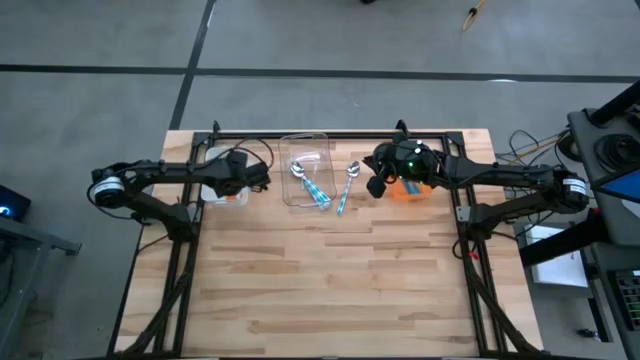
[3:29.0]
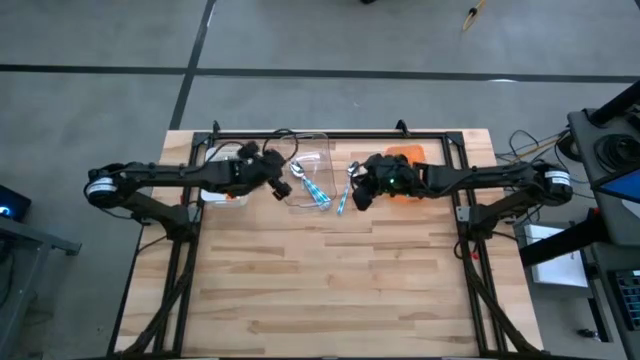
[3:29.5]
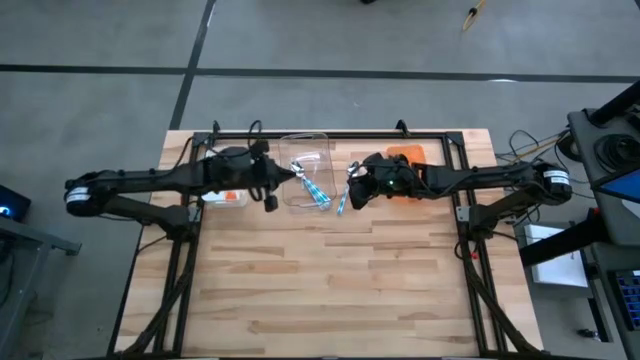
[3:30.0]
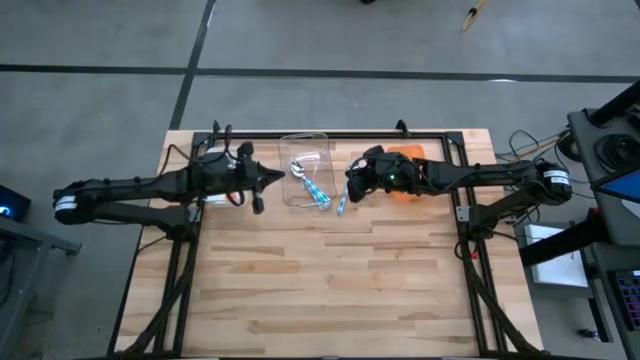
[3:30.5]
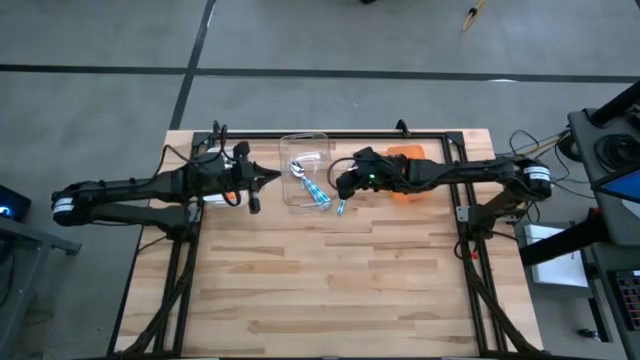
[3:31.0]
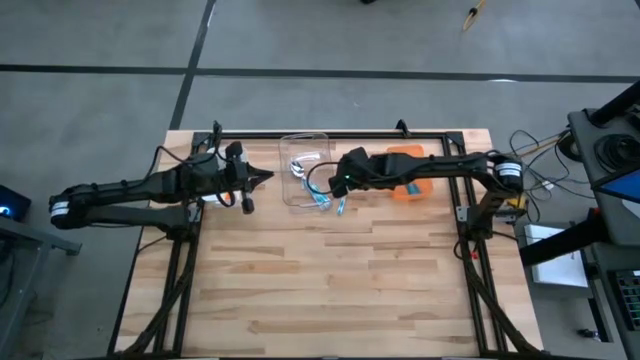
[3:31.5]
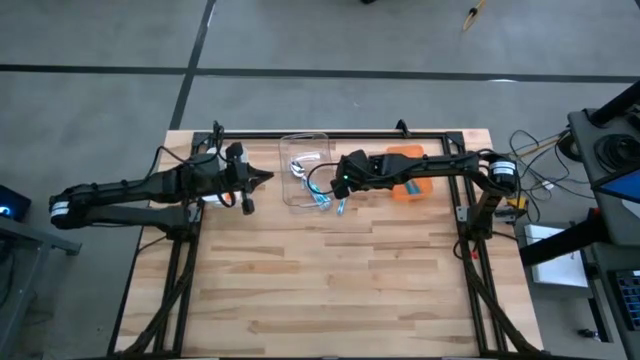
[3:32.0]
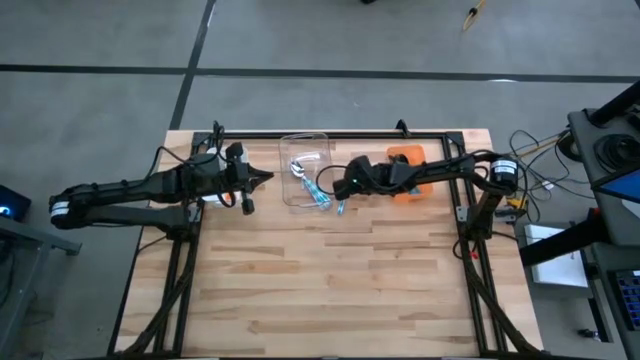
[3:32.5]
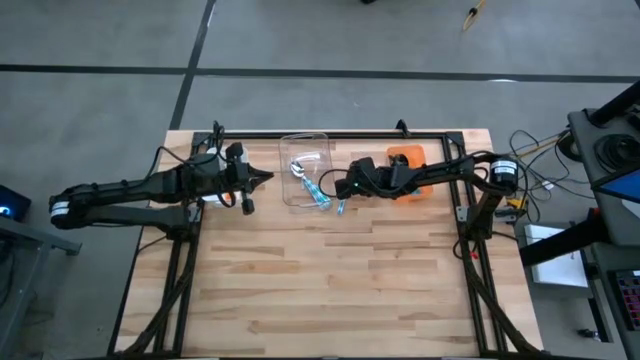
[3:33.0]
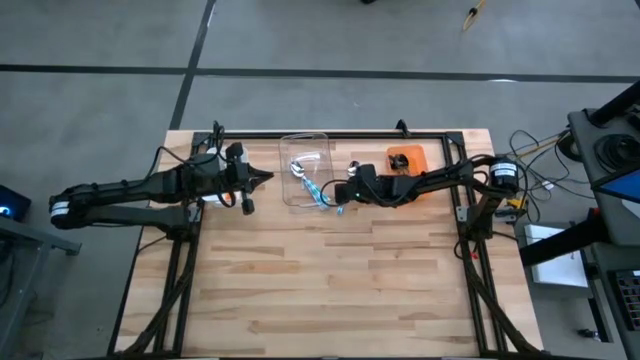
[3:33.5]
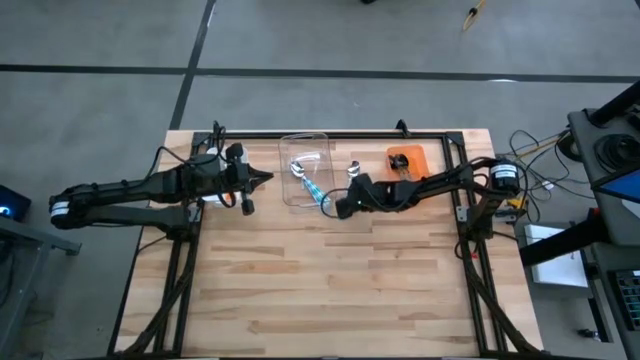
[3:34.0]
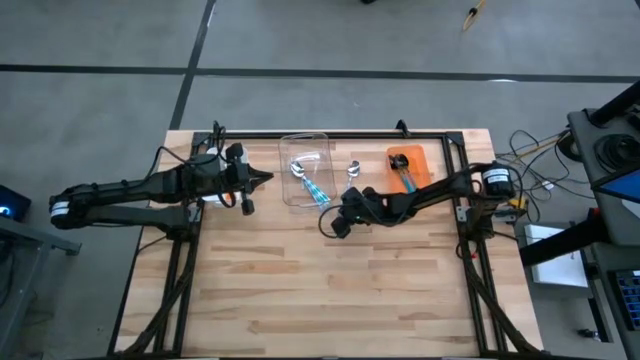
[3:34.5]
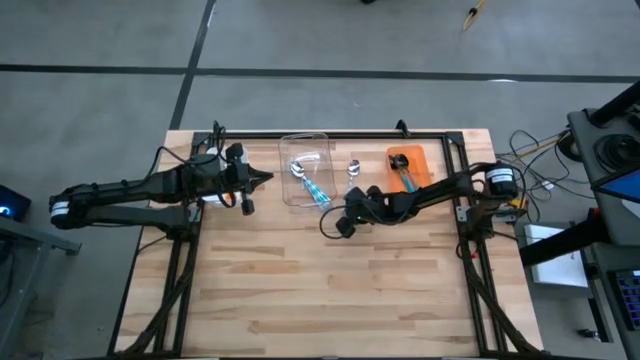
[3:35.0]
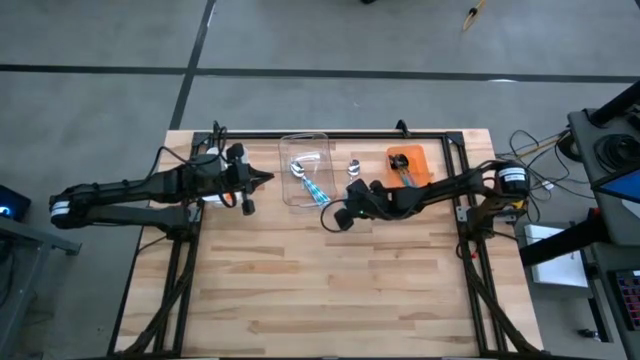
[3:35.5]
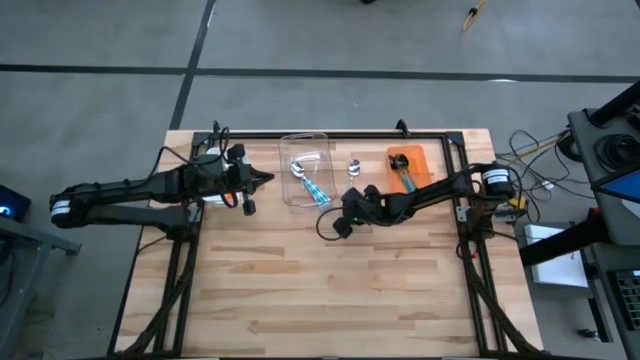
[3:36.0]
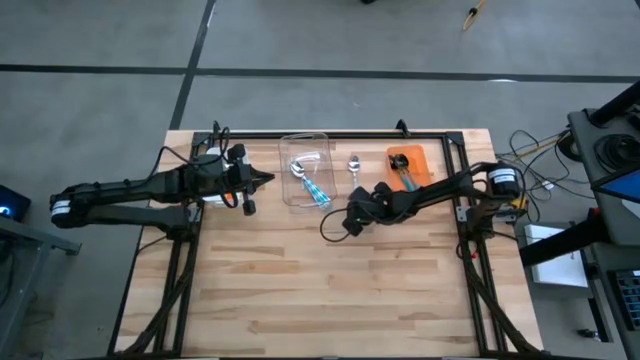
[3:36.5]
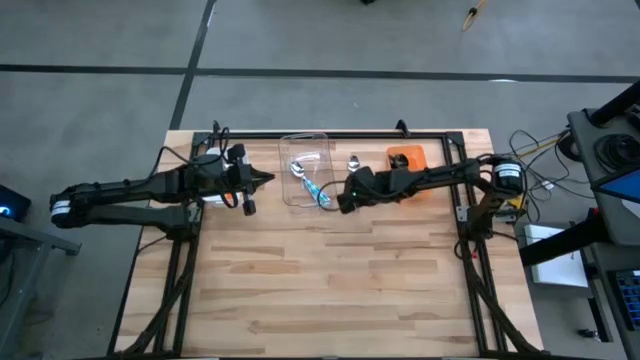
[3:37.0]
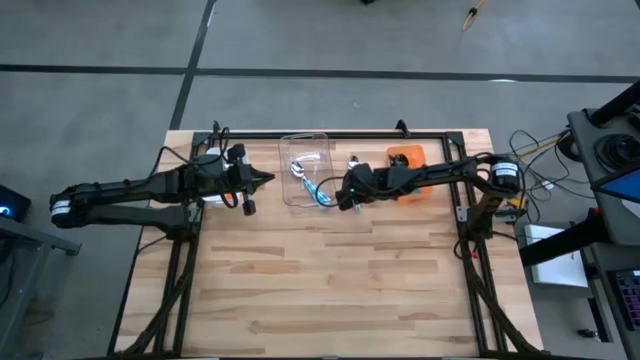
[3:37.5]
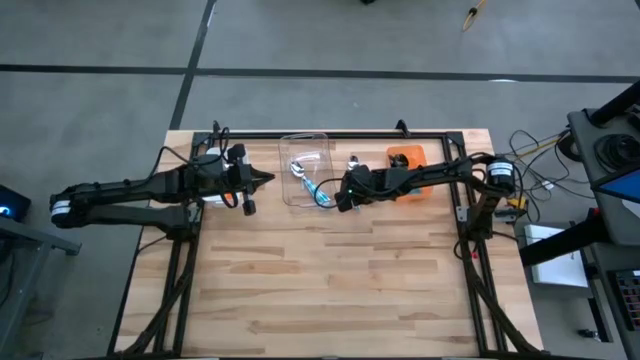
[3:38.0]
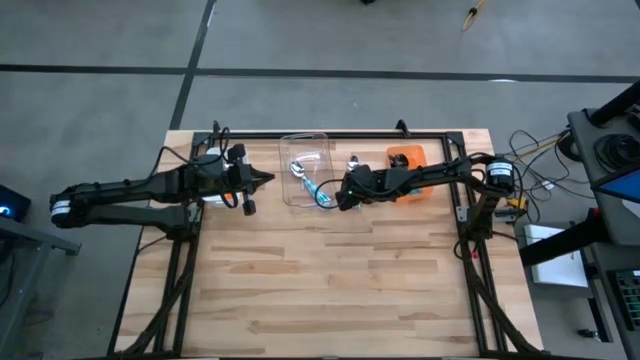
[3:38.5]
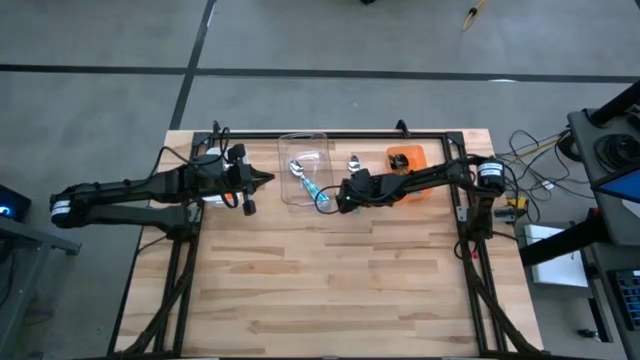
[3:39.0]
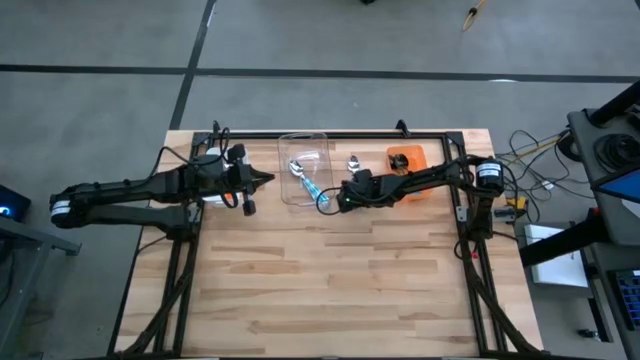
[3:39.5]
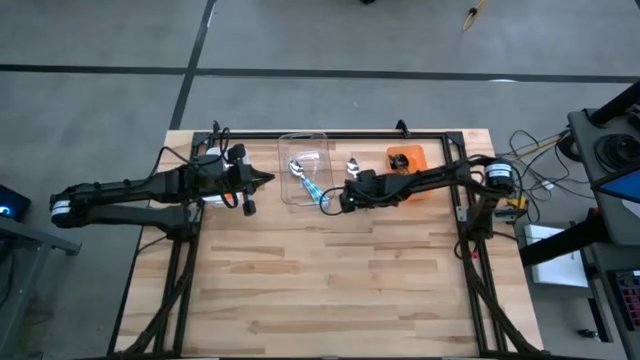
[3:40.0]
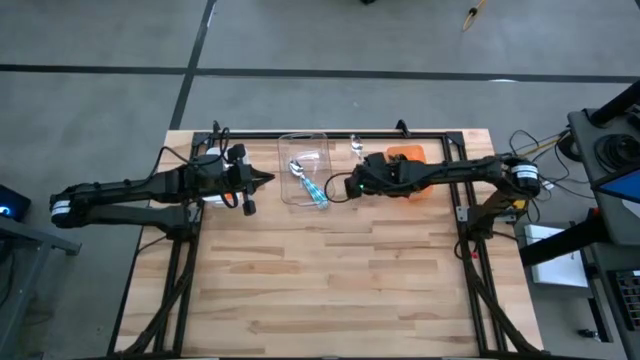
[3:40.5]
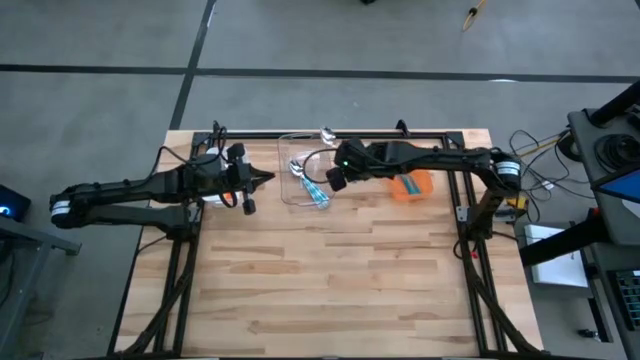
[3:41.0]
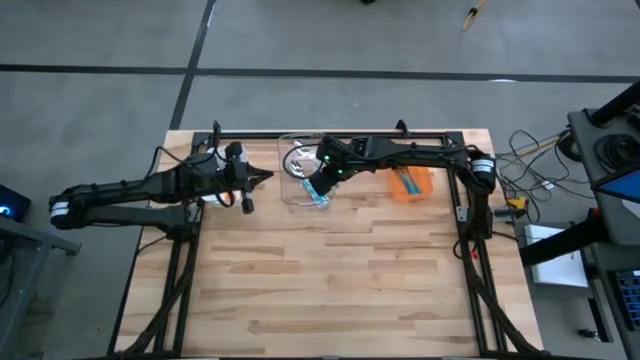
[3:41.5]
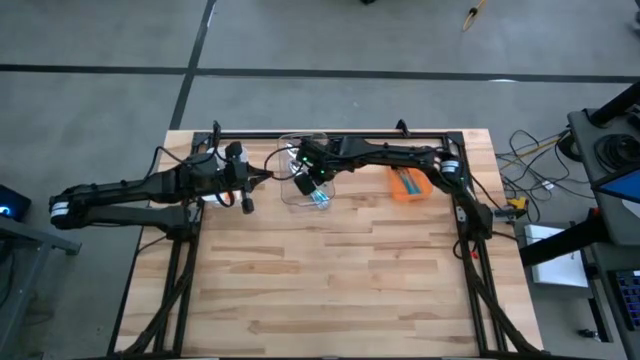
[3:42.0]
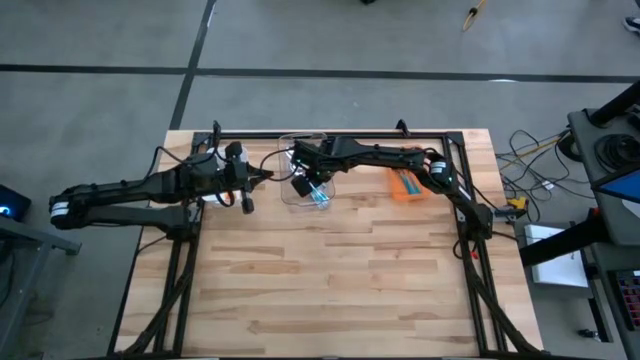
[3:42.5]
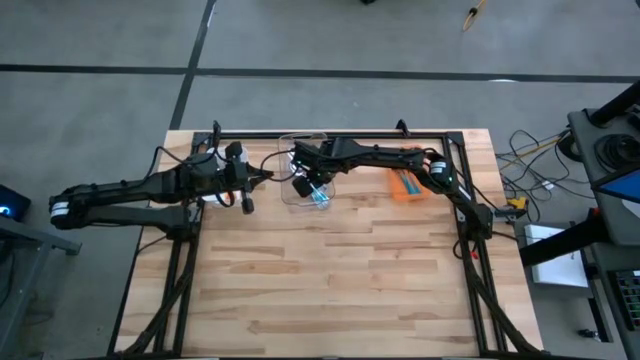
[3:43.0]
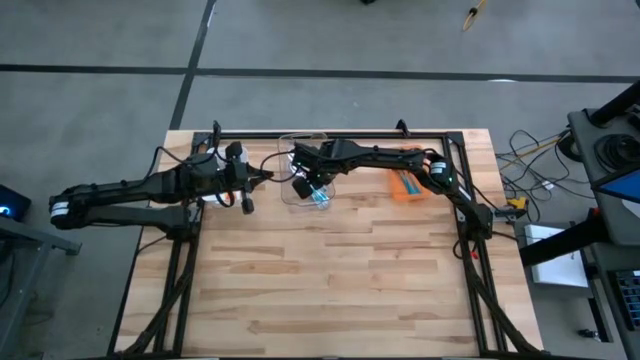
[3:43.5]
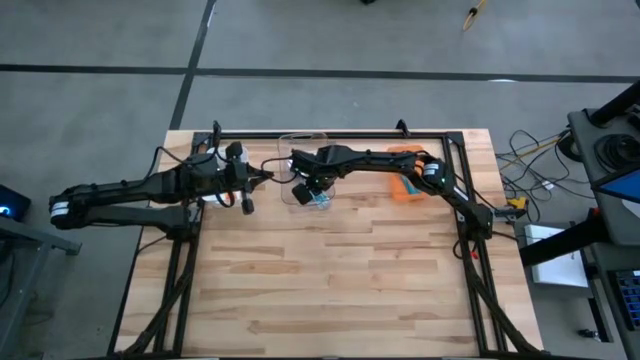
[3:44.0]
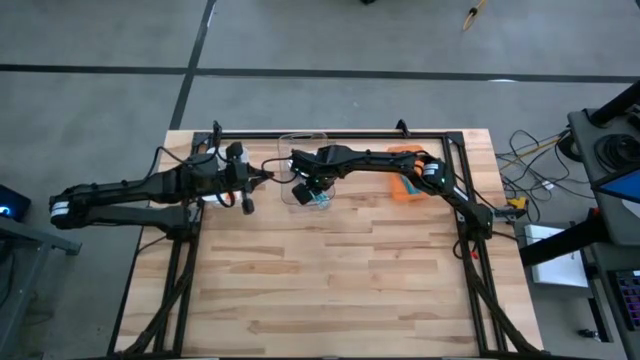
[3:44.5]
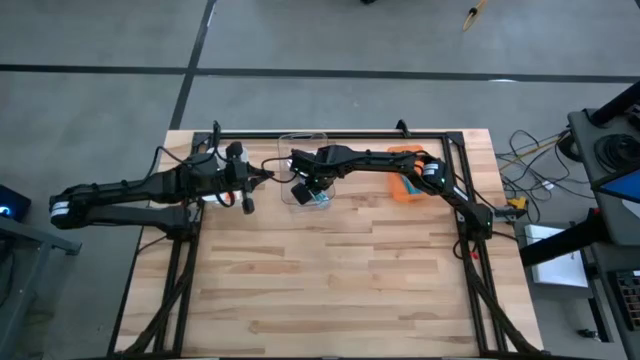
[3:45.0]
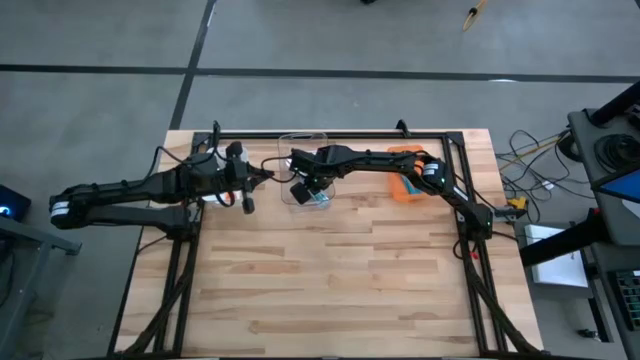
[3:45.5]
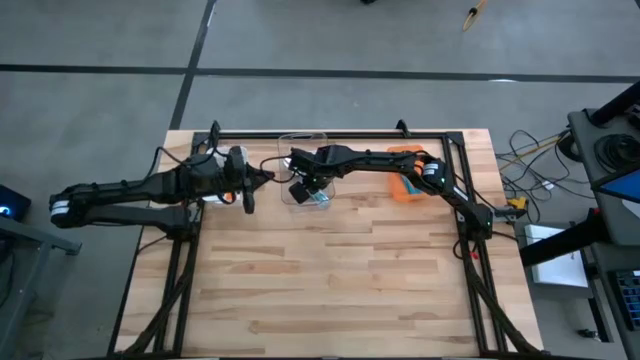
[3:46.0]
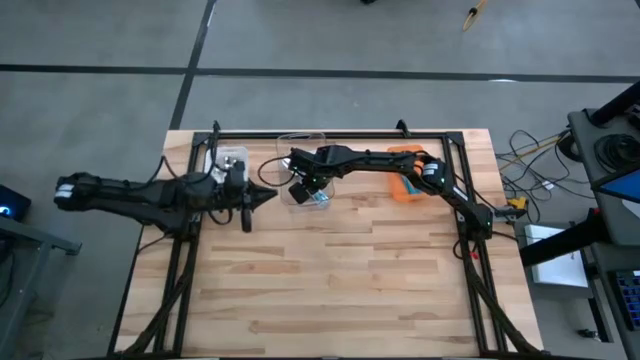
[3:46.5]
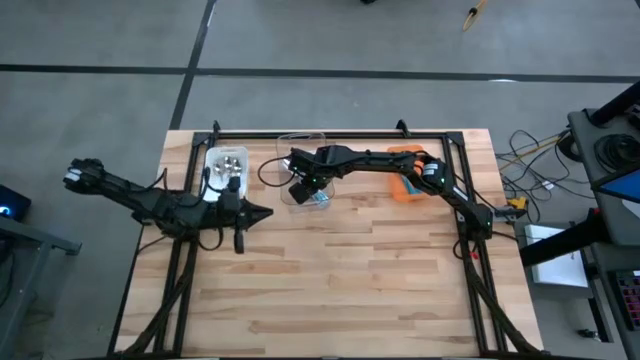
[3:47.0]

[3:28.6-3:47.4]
Task: Sort silverware by color (type)
Put the blue patterned spoon into the transparent bin

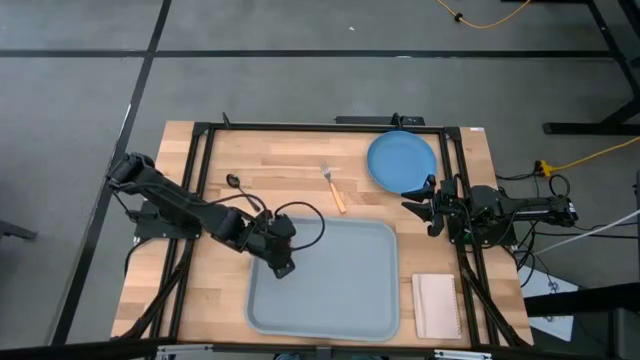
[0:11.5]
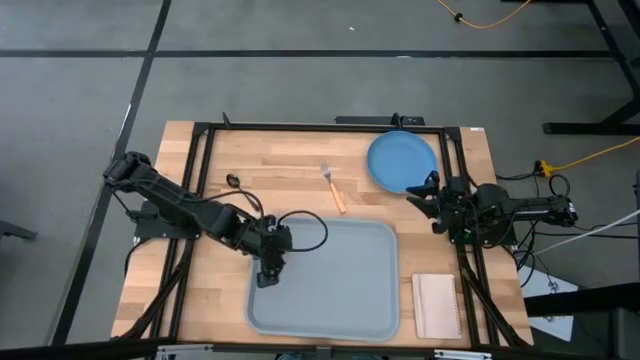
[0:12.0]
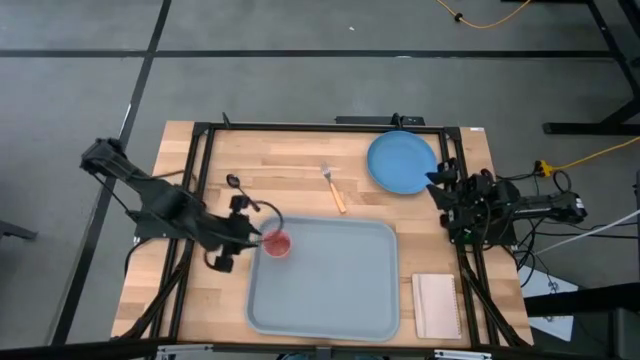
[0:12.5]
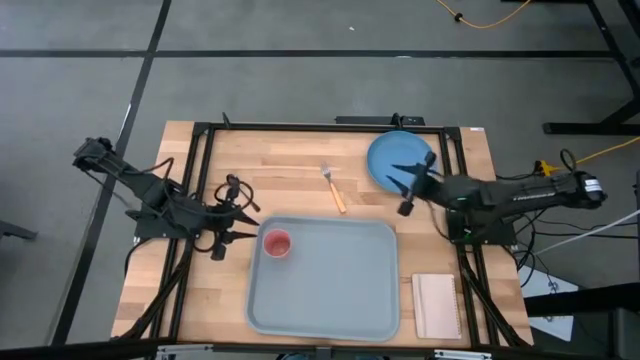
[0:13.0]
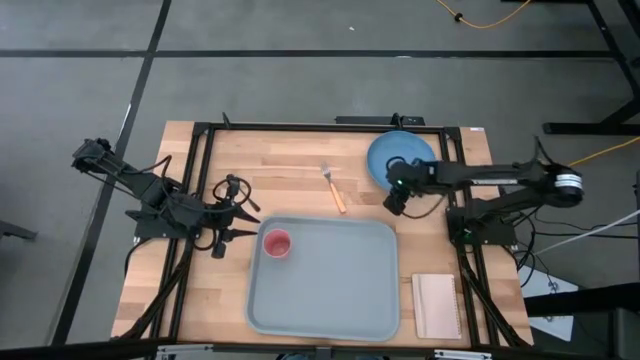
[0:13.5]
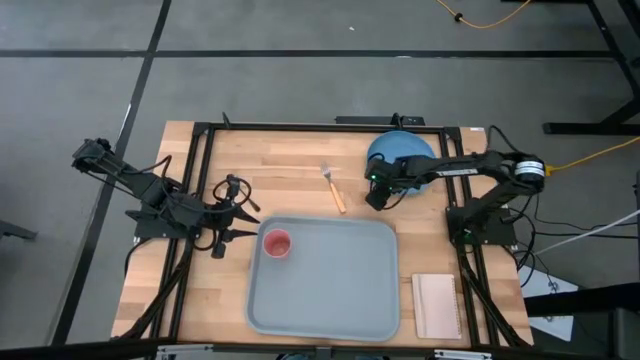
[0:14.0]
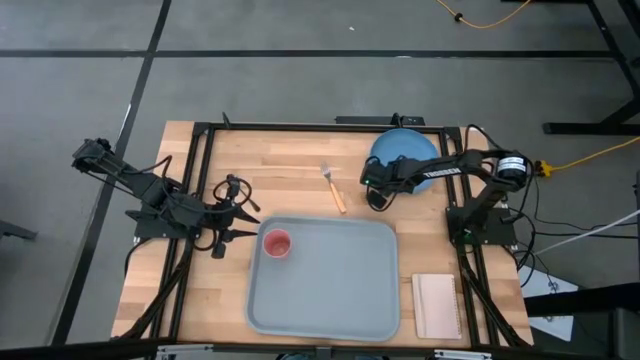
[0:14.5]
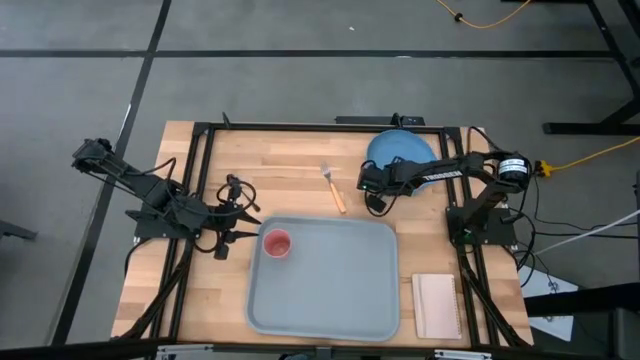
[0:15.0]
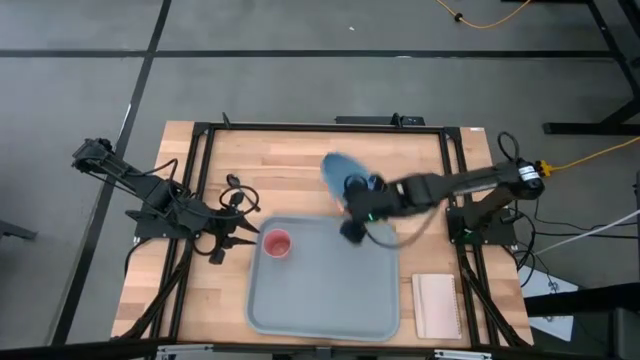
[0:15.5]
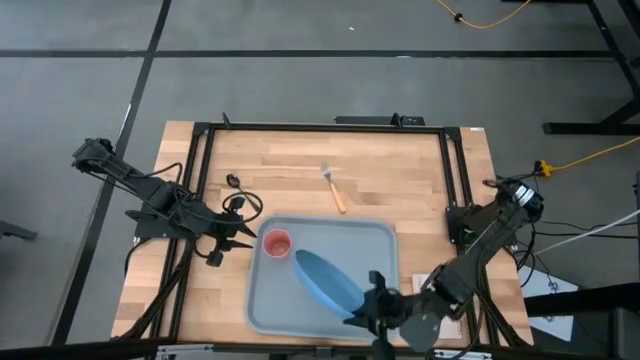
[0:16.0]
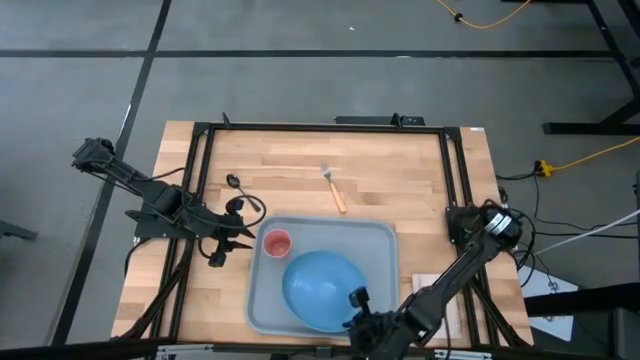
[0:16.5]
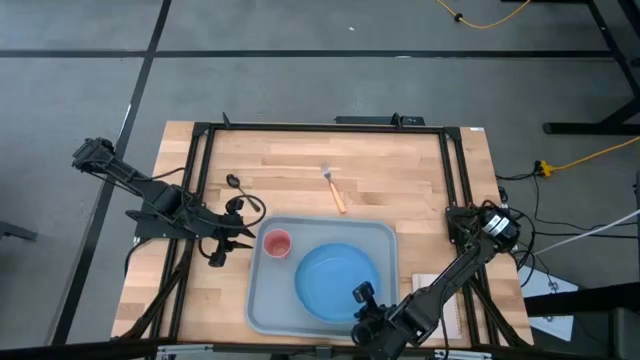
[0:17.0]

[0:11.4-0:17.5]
Task: Pick and place plate/cup/fork/spoon on tray
Put the blue plate on the gray tray on the right of the pink cup
